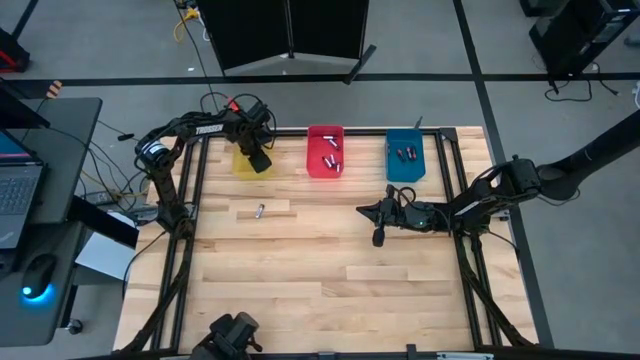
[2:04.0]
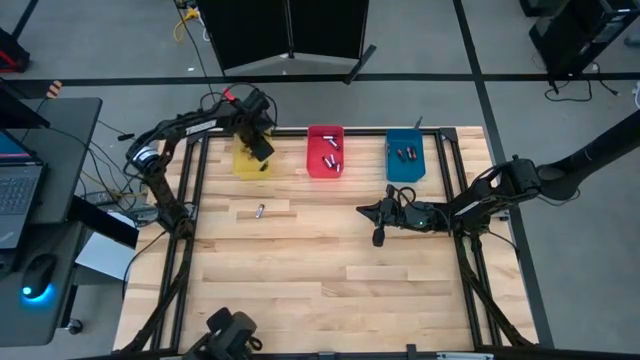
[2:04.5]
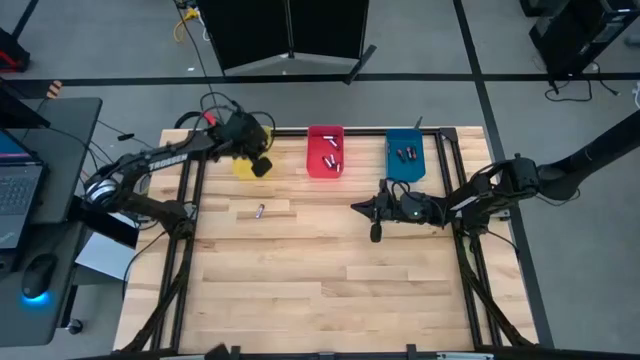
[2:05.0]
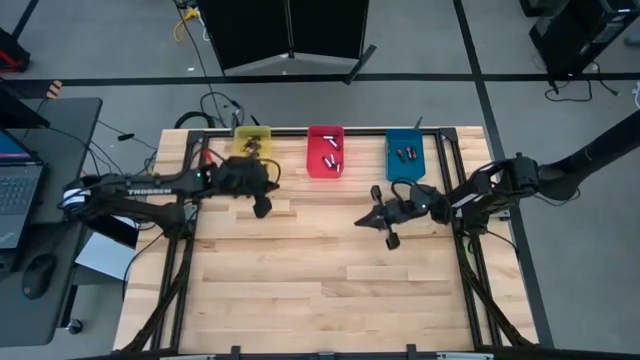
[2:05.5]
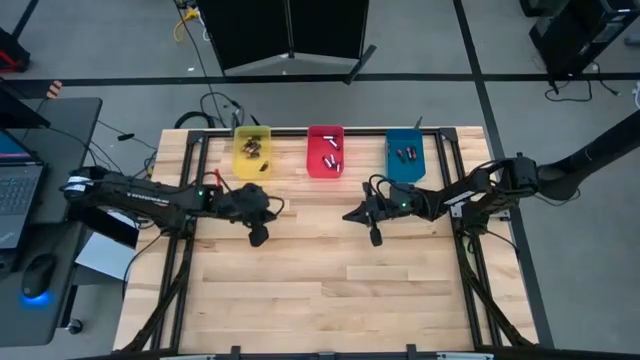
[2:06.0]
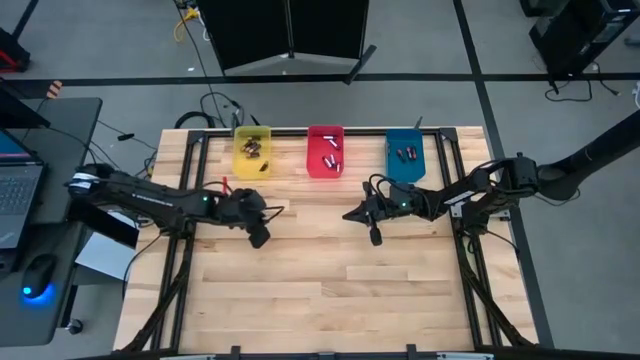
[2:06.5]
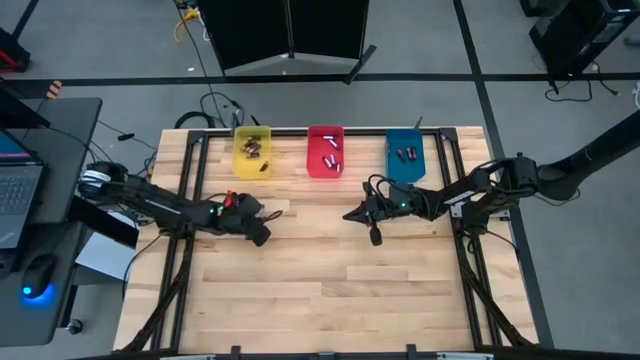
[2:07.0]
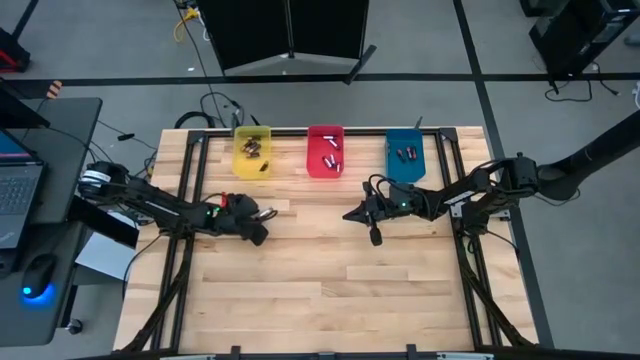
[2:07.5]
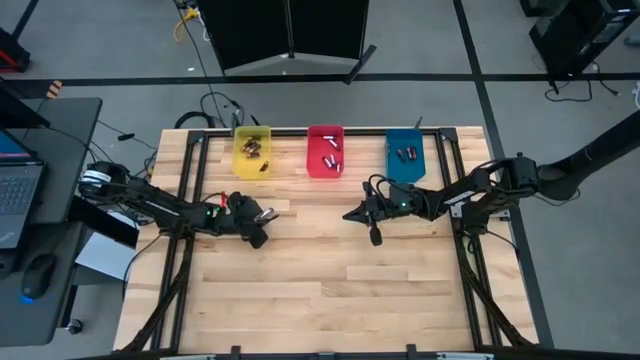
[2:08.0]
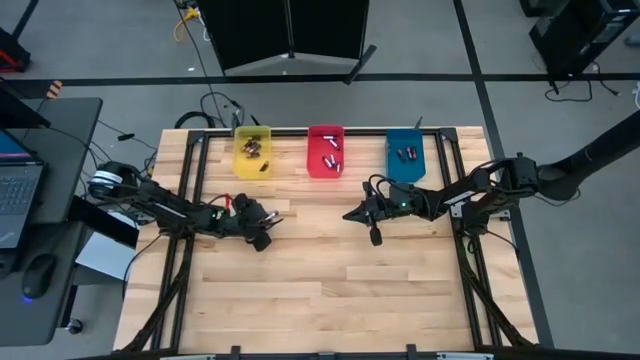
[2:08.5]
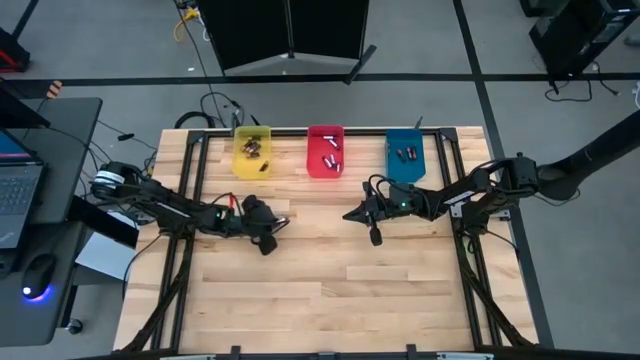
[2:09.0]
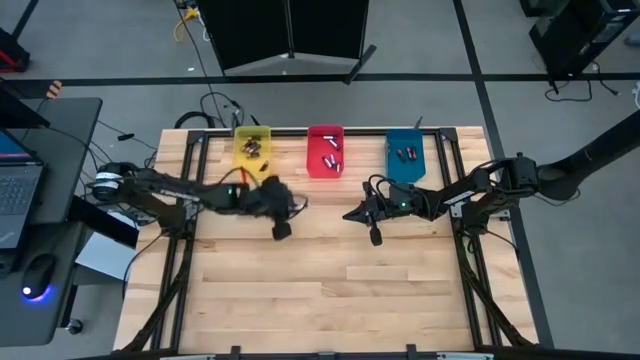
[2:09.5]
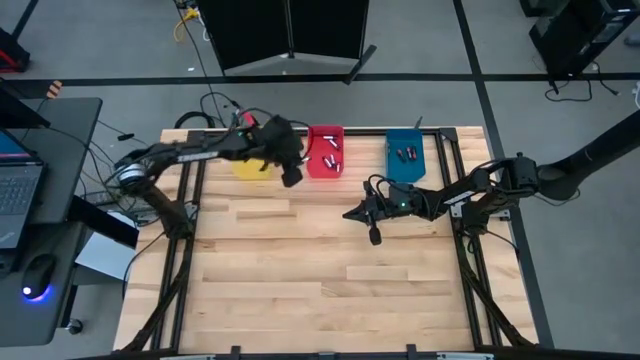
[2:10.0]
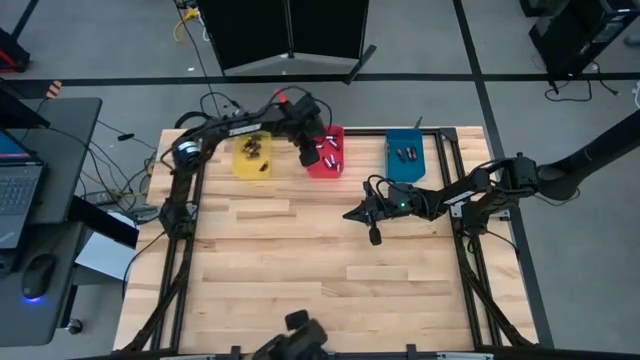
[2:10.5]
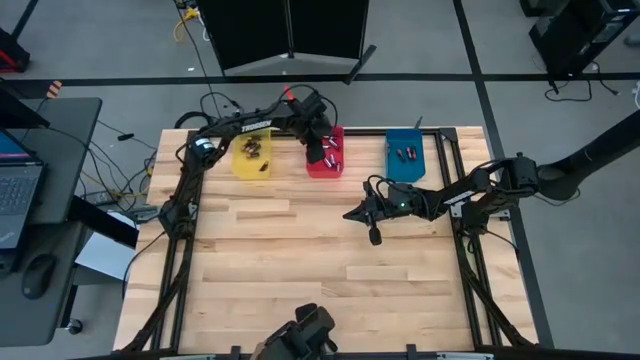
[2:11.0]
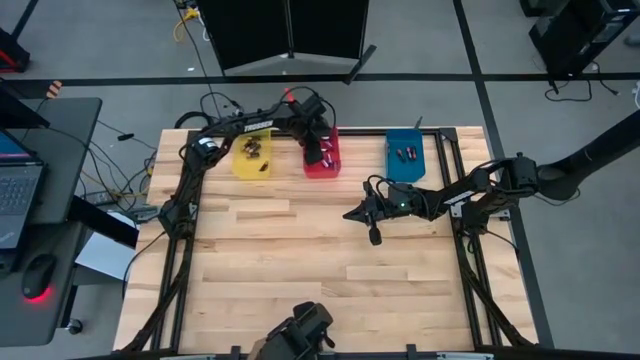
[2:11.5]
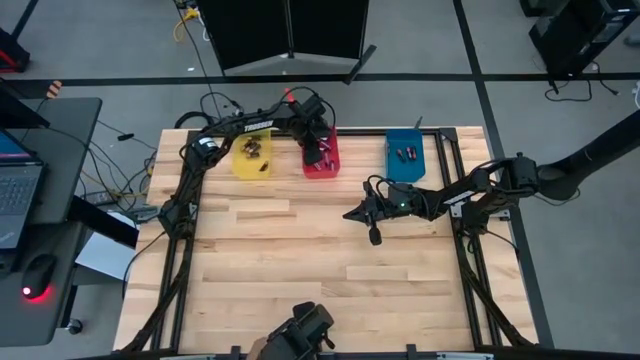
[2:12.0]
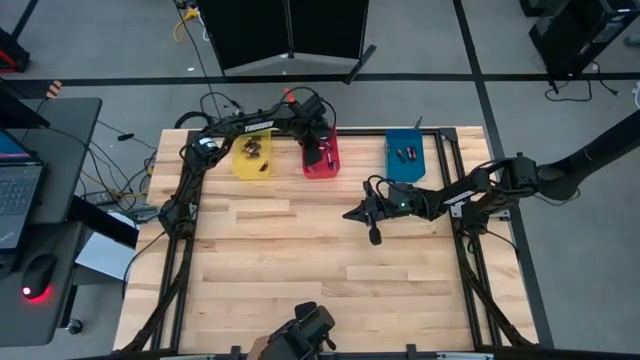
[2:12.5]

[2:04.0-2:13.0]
Task: Sort batteries
Put the silver battery into the red bin

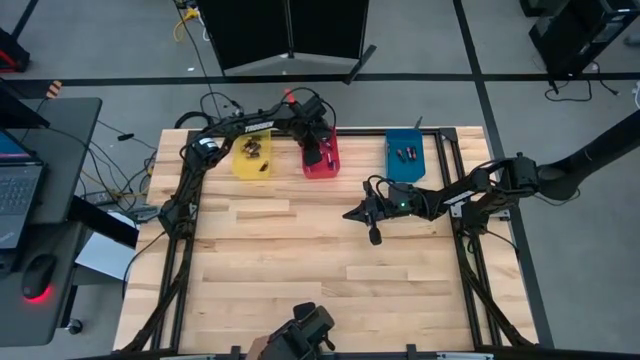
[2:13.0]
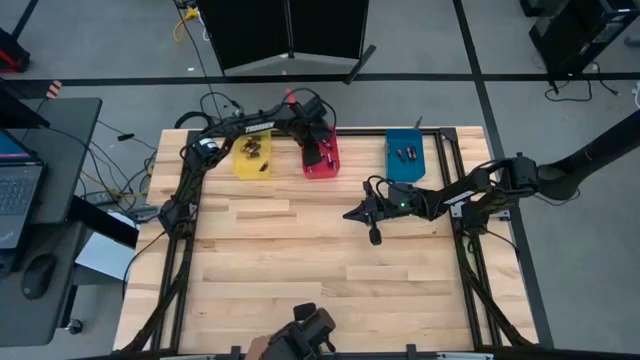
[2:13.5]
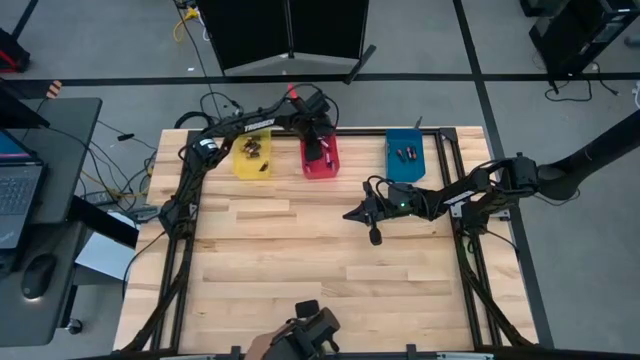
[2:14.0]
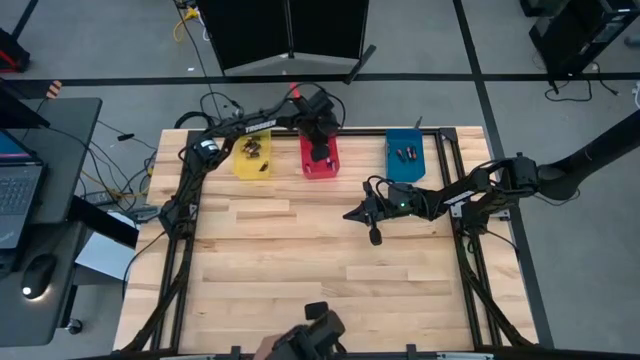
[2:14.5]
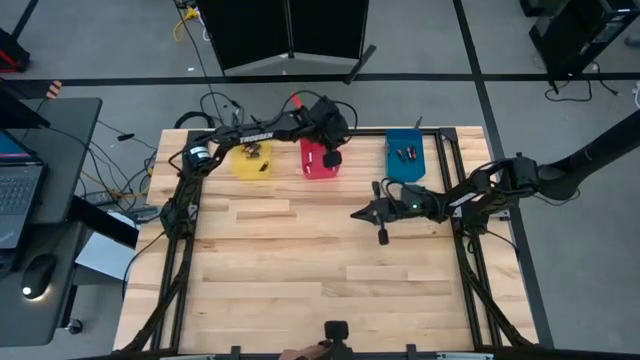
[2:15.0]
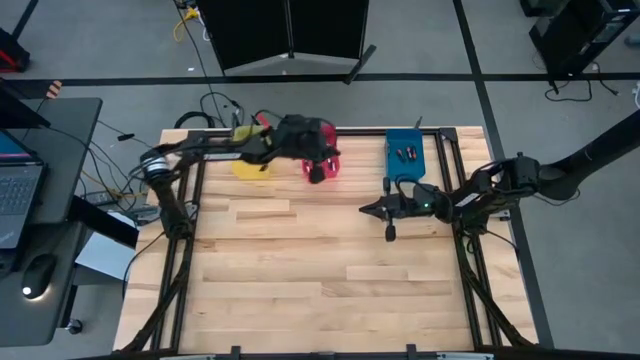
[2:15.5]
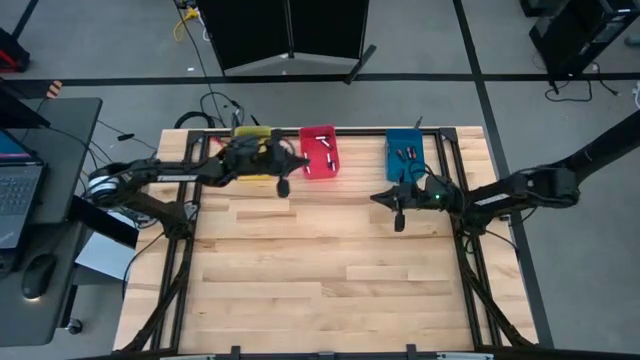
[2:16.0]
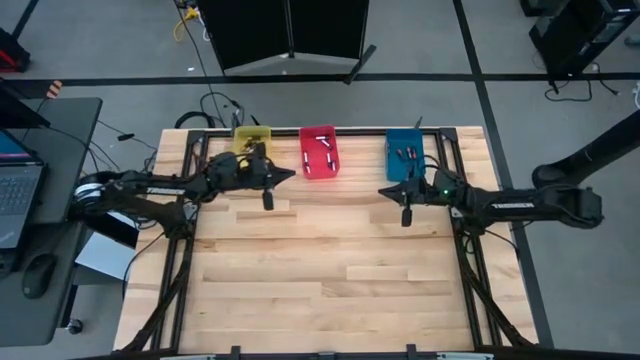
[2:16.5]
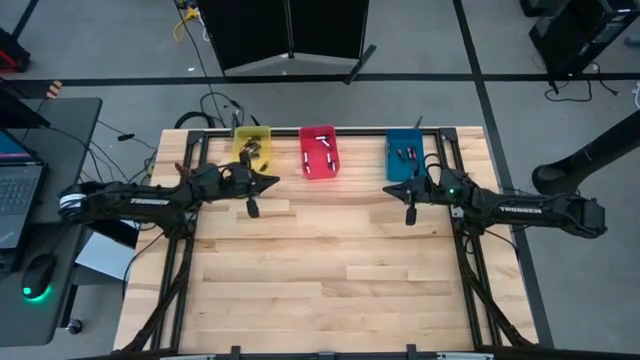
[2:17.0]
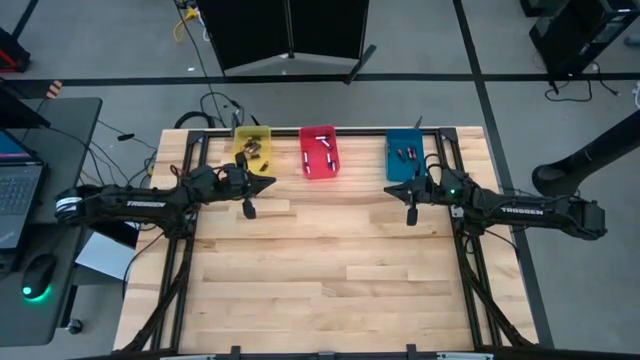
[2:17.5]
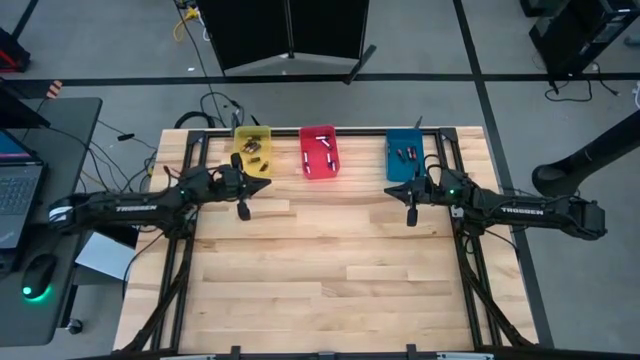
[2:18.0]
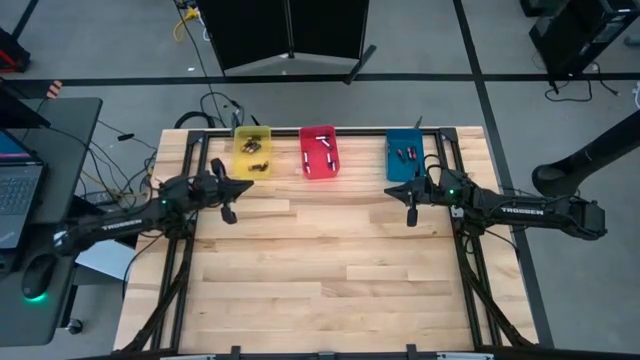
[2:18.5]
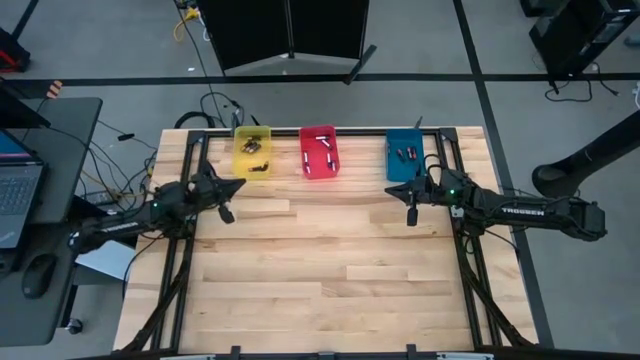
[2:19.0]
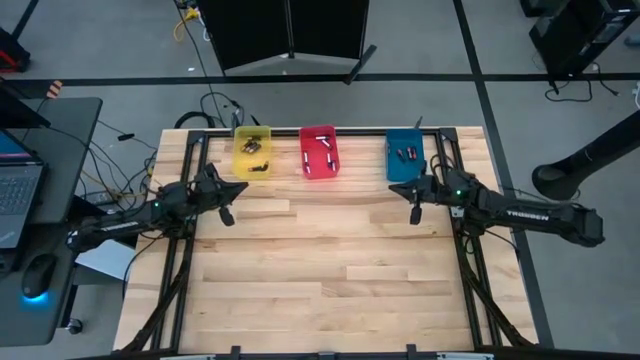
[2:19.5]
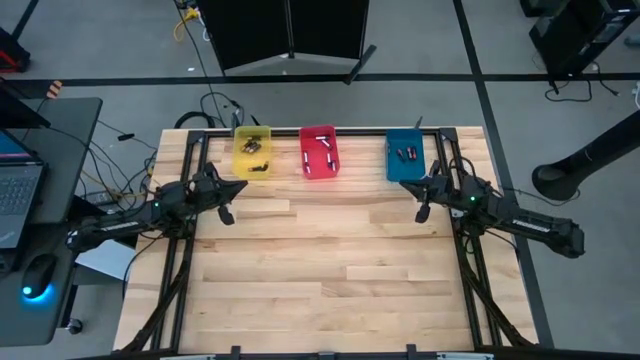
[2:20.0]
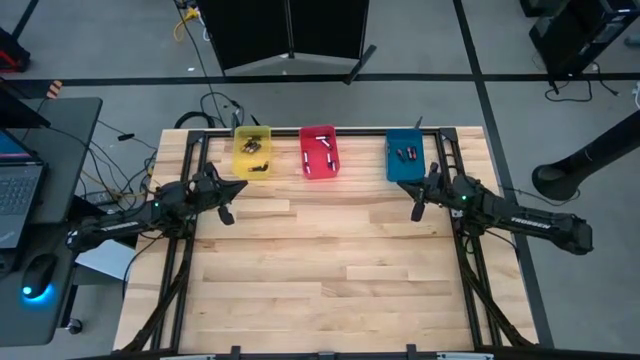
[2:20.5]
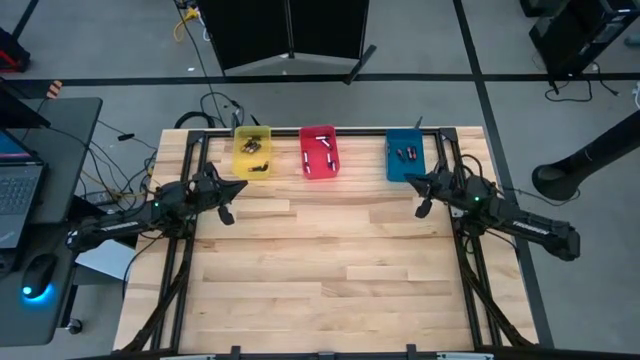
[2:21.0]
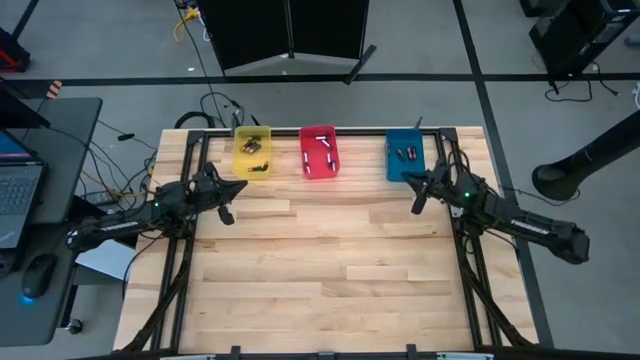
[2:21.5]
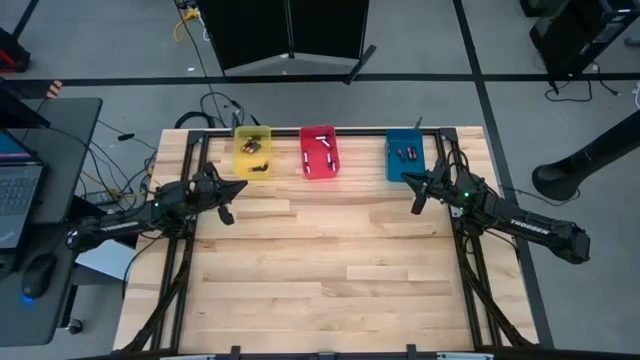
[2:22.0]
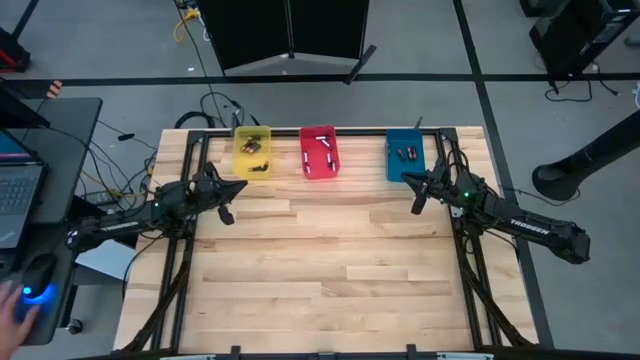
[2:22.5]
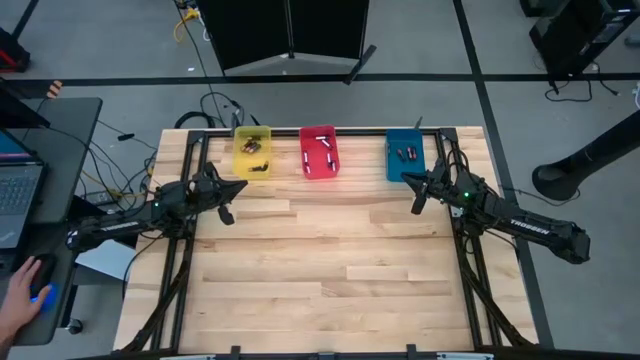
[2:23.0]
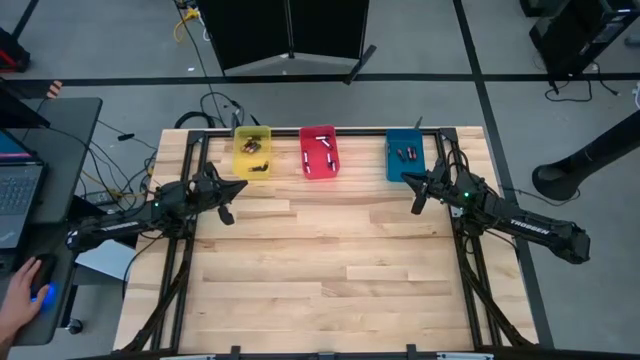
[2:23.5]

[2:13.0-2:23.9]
Return to Home Position

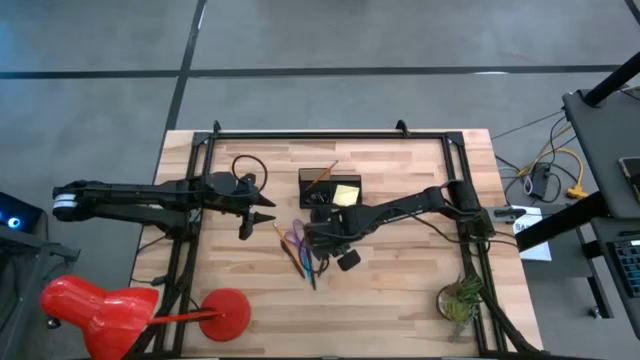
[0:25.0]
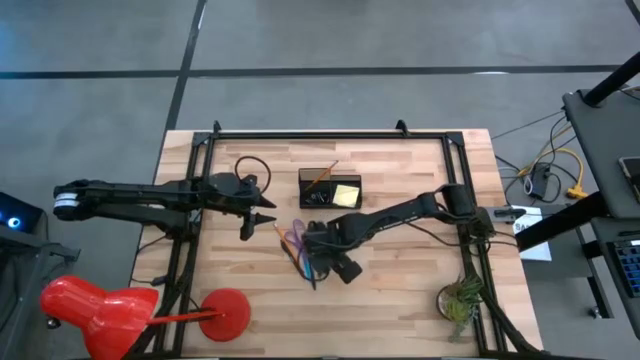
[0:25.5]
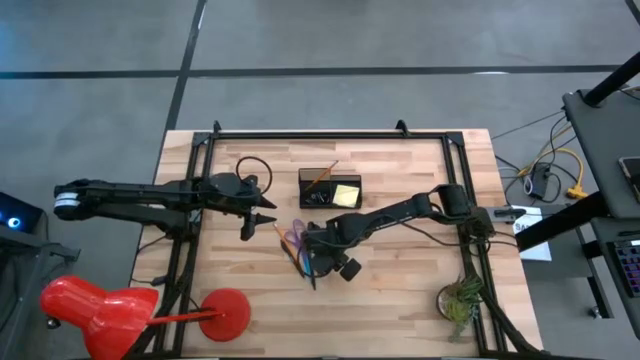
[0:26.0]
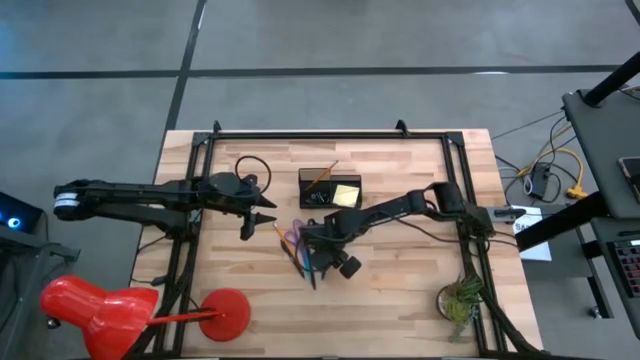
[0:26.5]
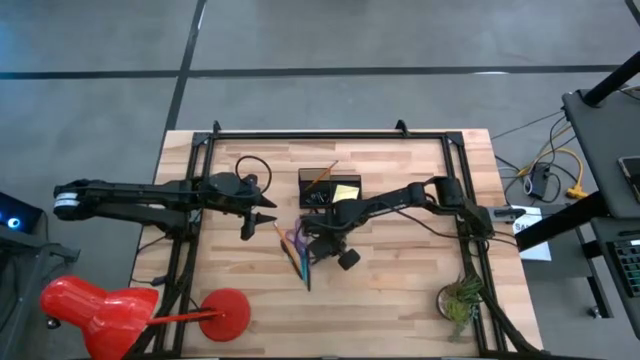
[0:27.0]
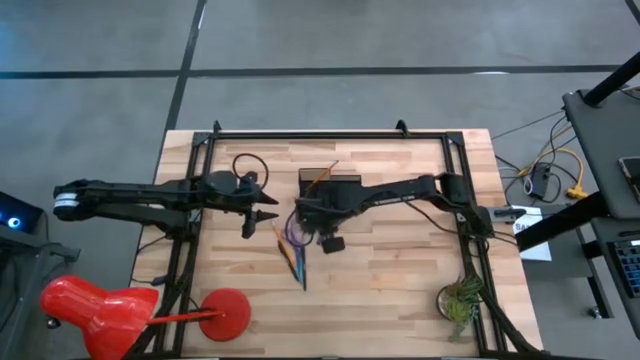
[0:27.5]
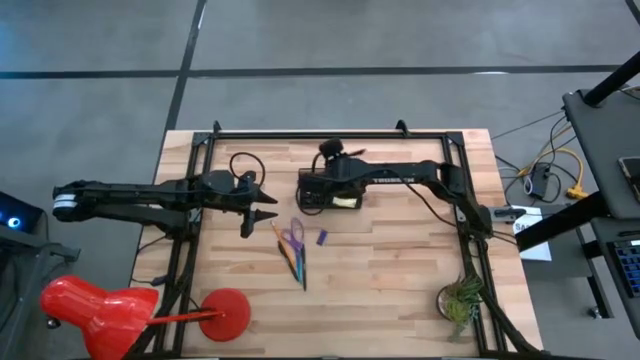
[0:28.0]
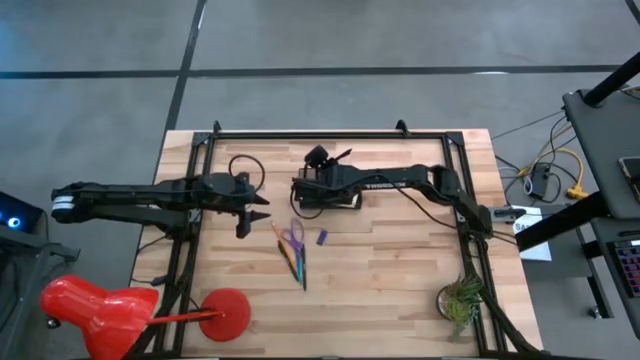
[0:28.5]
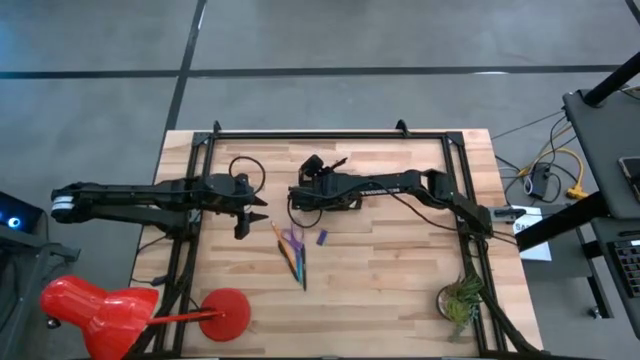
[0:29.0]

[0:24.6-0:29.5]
Task: Pick and place office supplies into organizer
Put the right black pen into the black desk organizer
